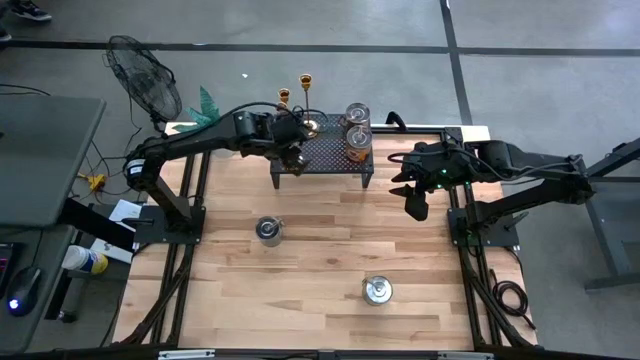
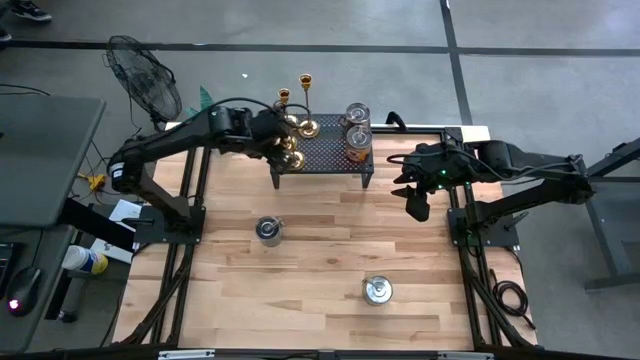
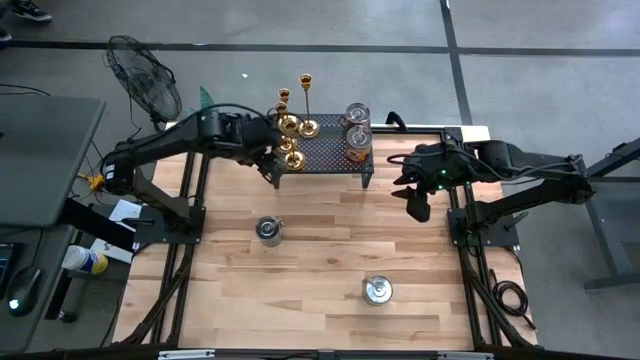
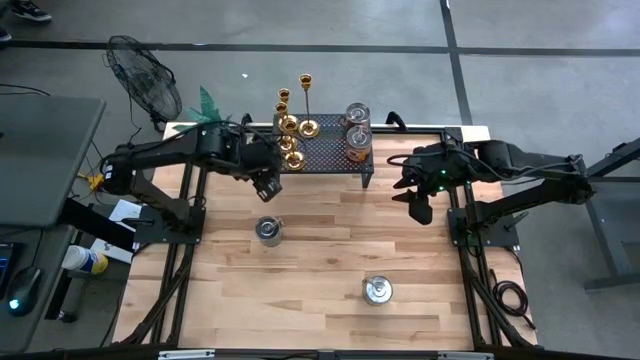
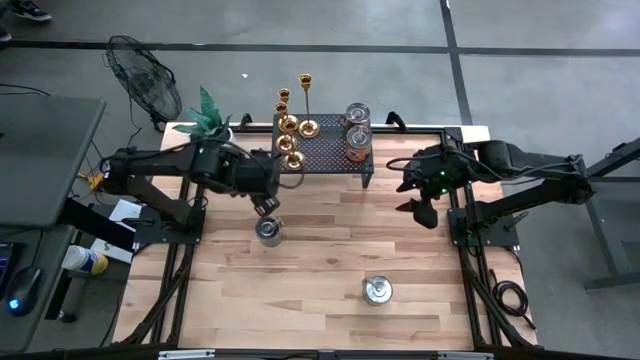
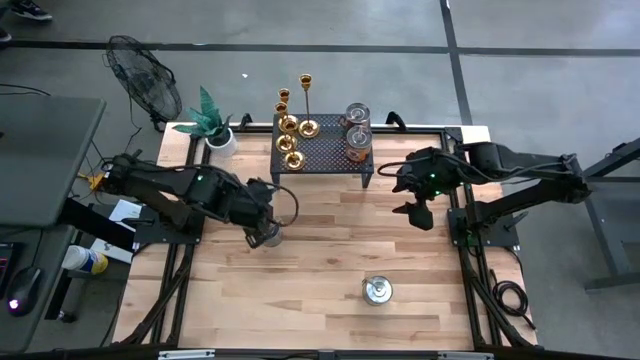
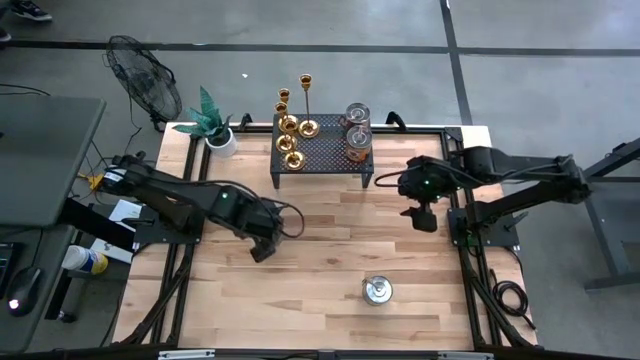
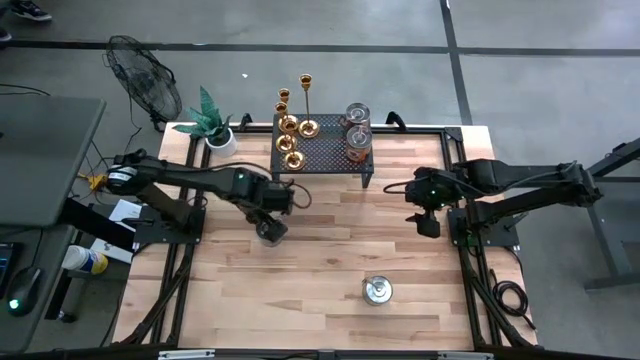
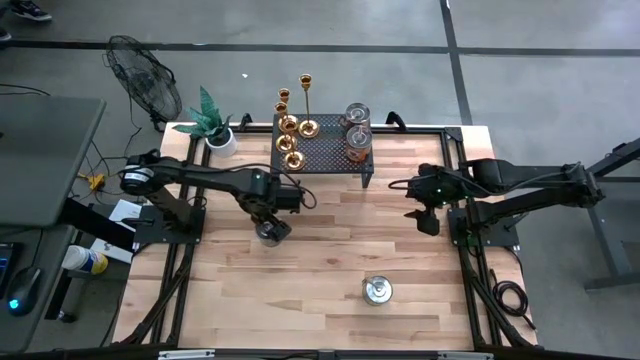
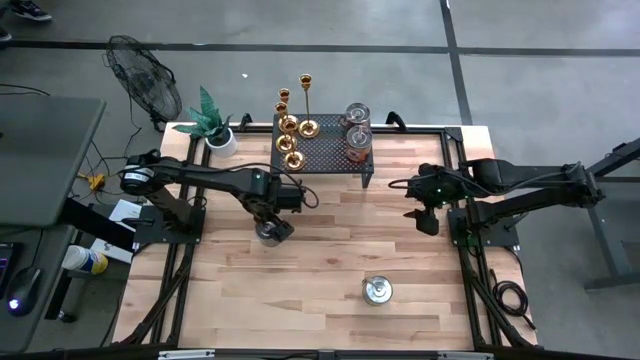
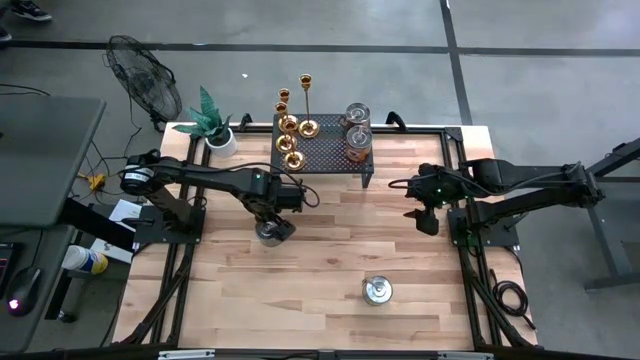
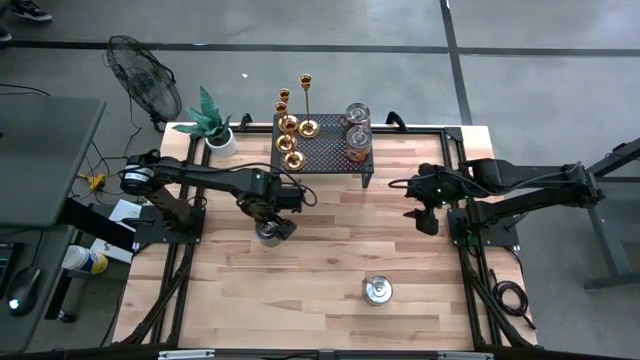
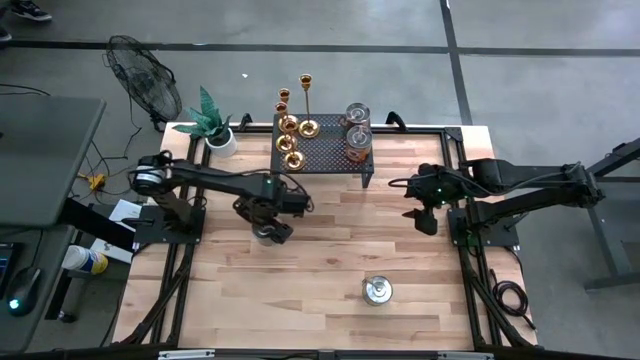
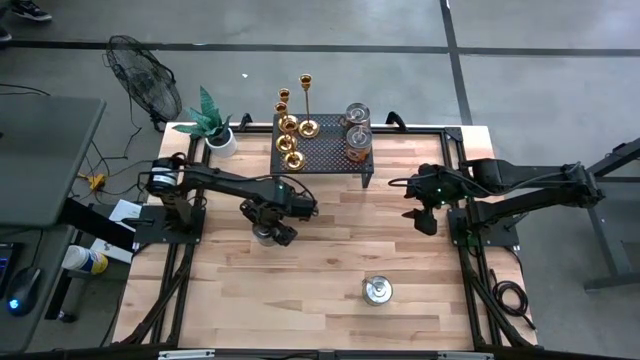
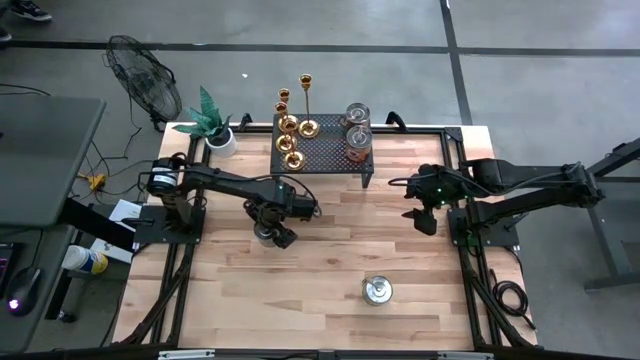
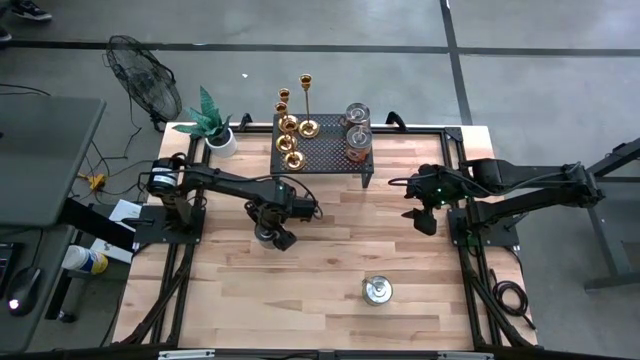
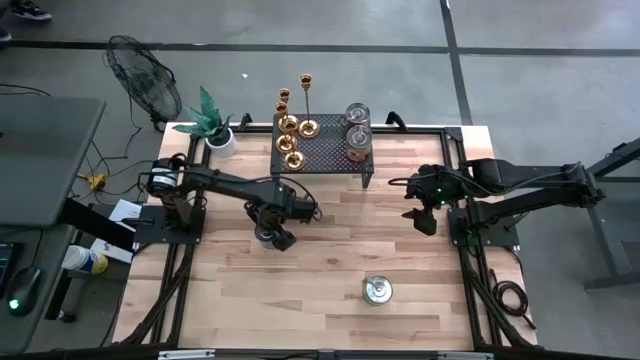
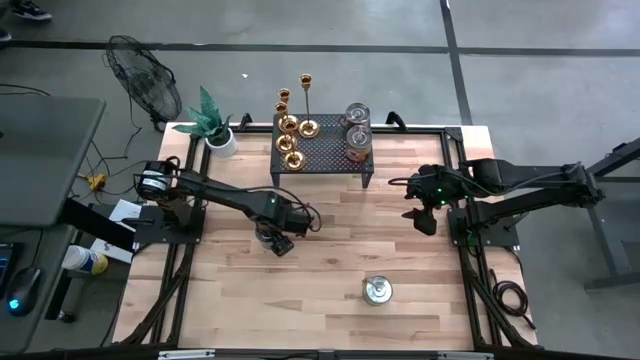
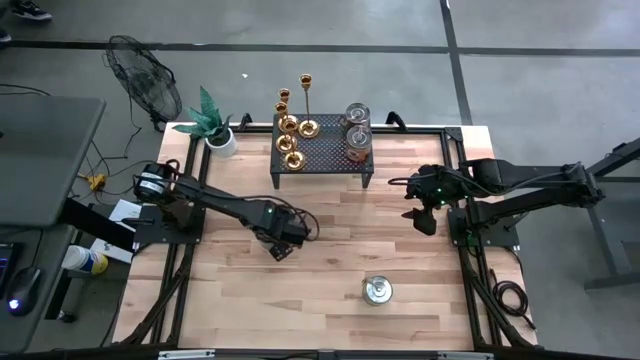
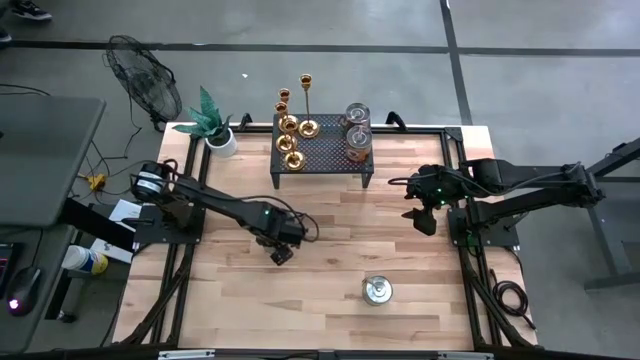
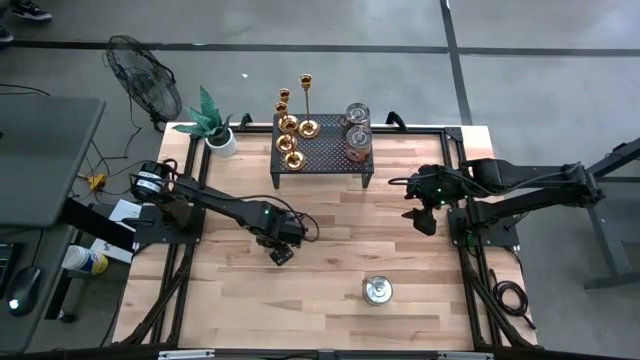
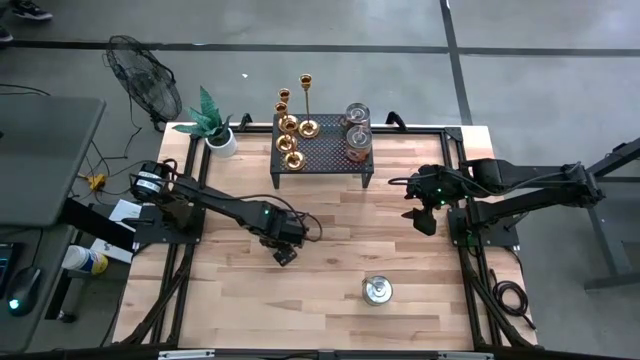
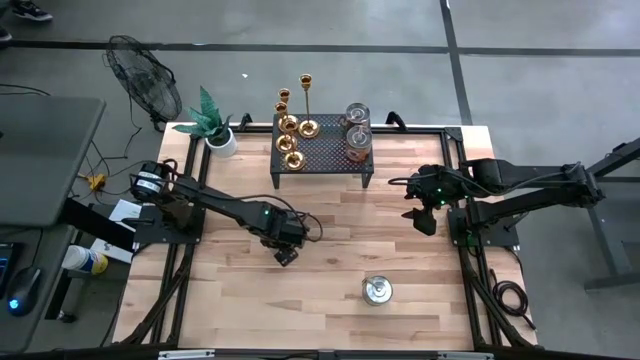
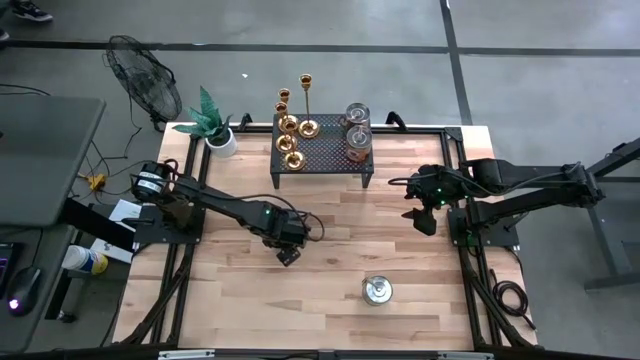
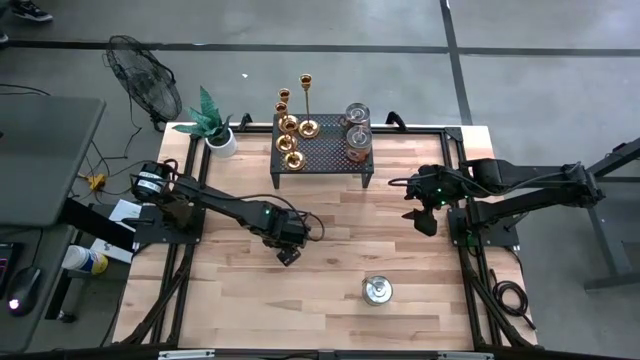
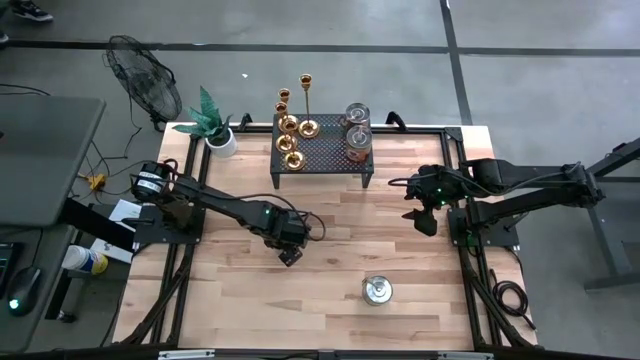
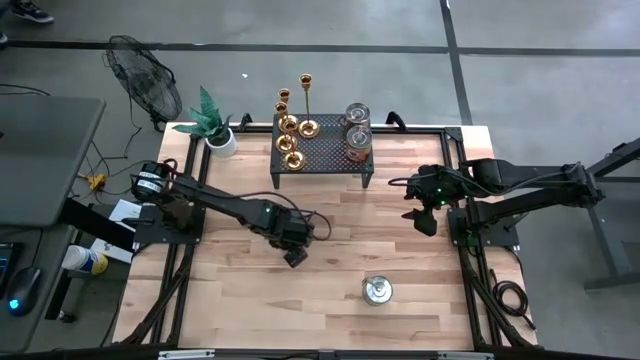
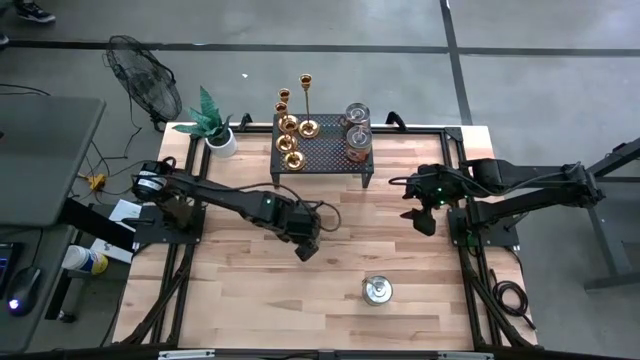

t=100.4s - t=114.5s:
Task: Pick & Place candle stick holders
Put the brown scented candle on the shelf

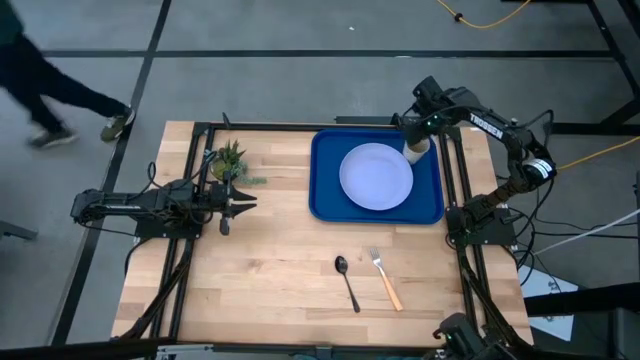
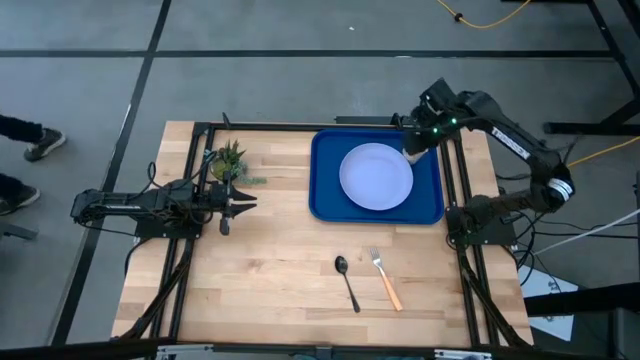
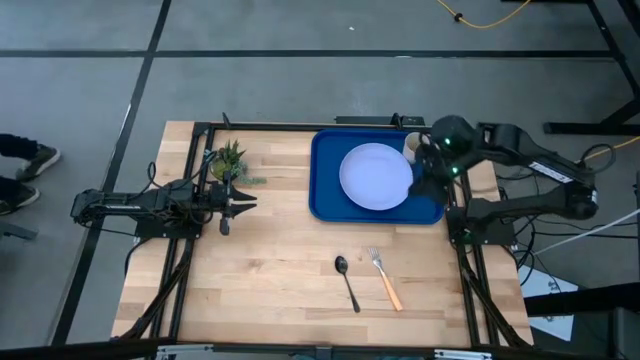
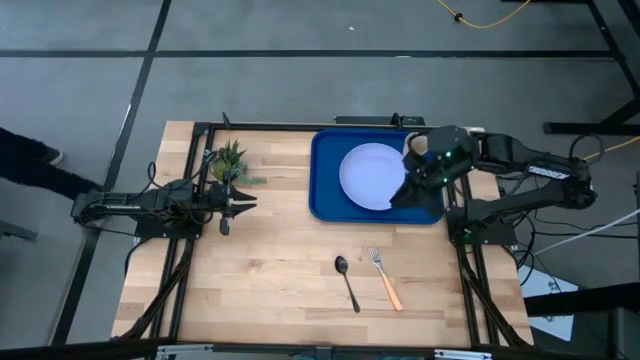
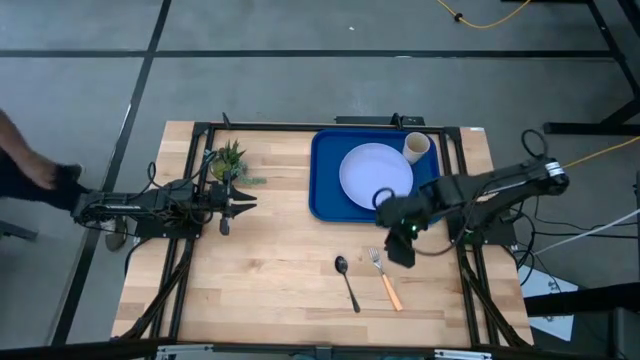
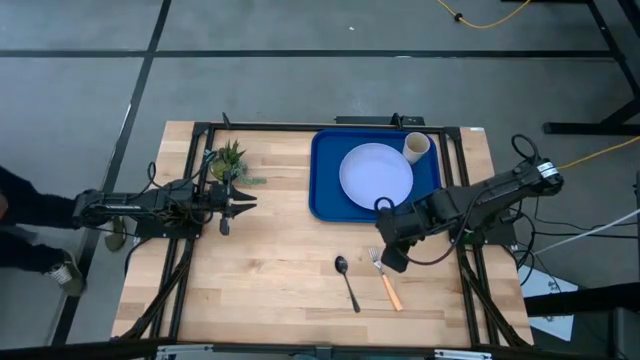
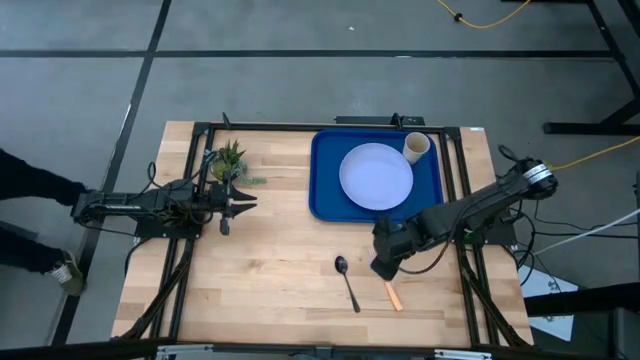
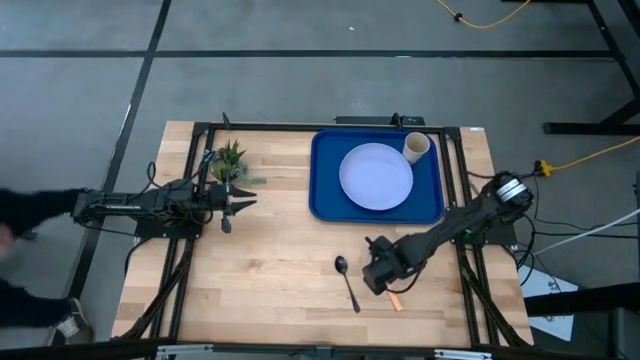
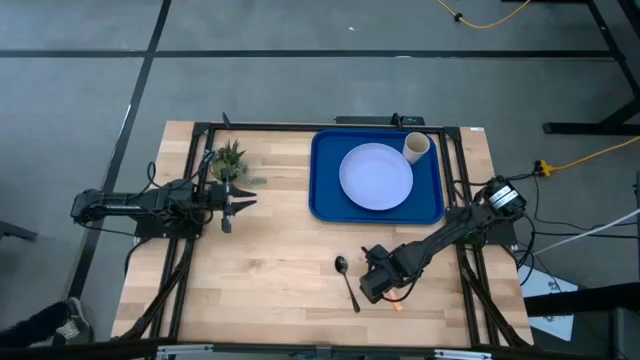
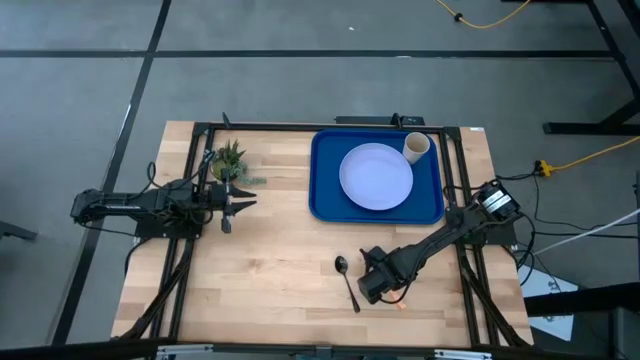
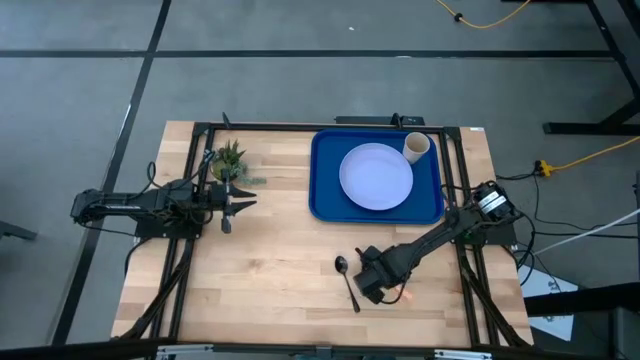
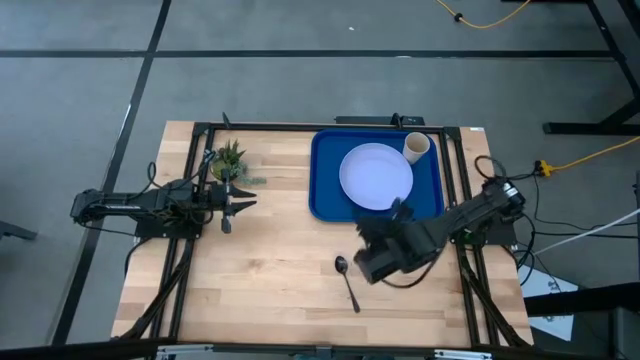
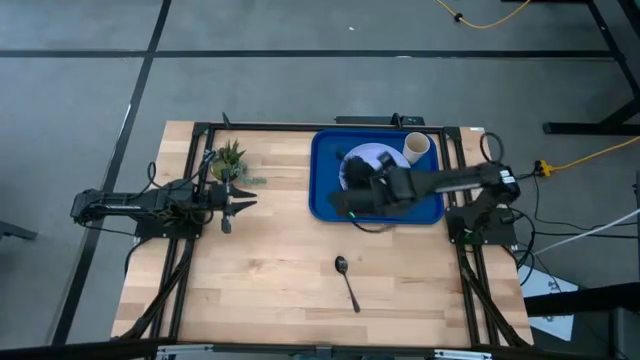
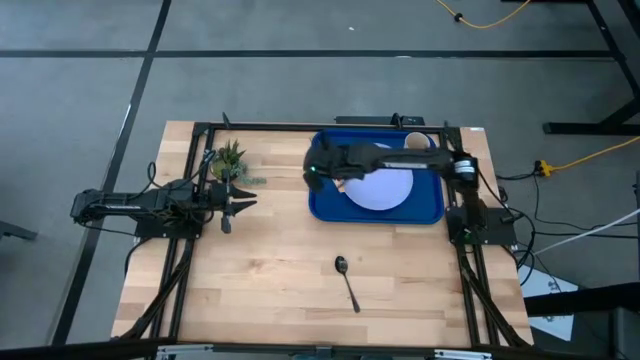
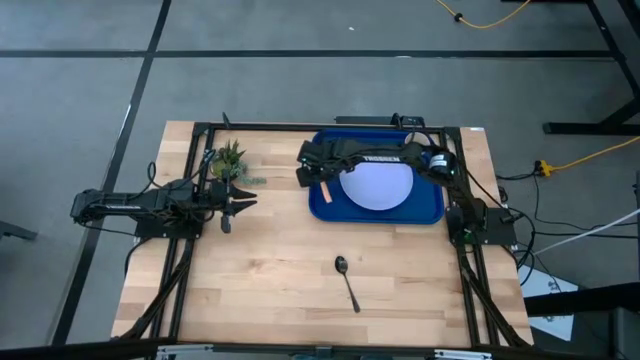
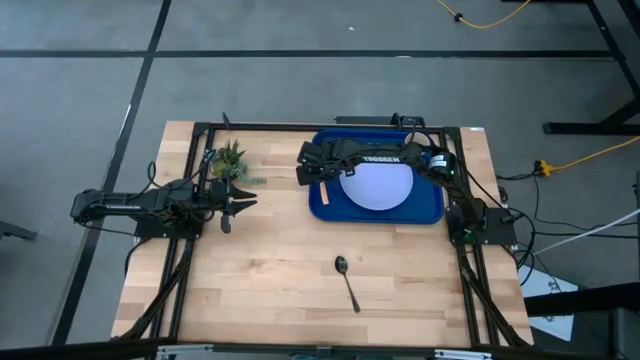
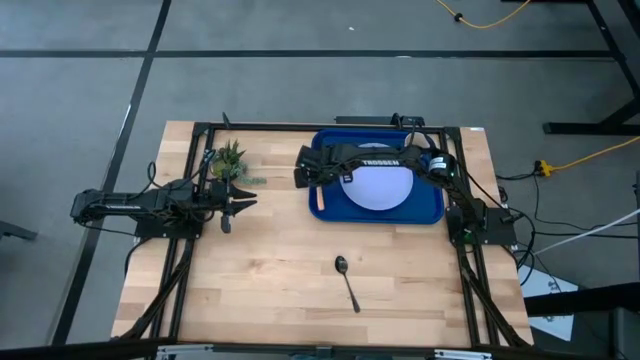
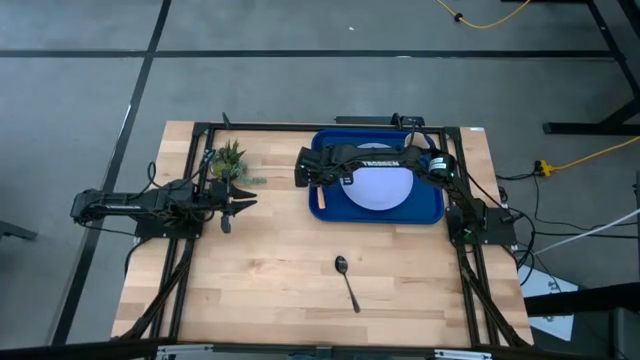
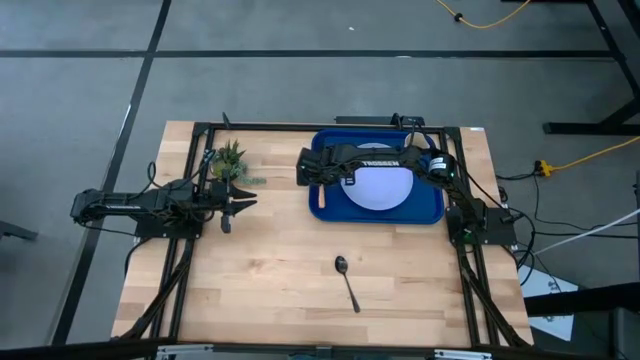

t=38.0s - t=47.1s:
Task: Pick and place plate/cup/fork/spoon on tray
Put the yellow fork to the left of the purple plate on the blue serving tray
